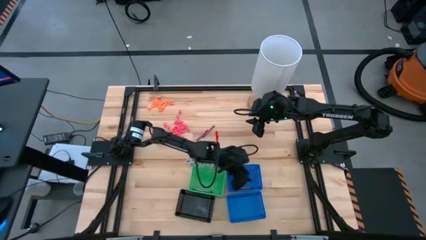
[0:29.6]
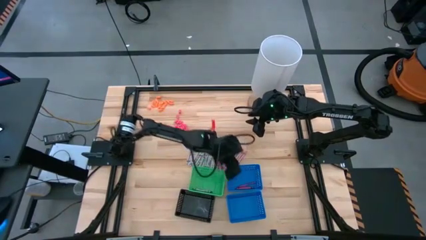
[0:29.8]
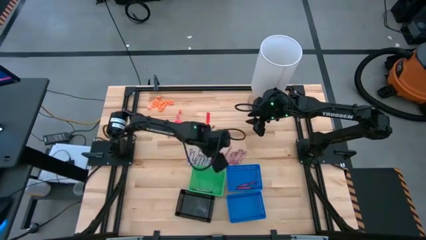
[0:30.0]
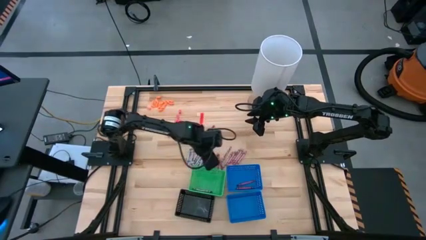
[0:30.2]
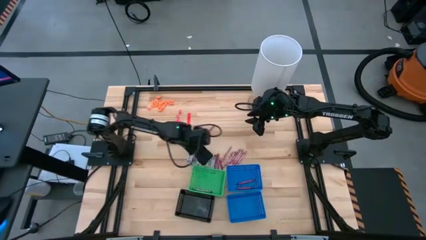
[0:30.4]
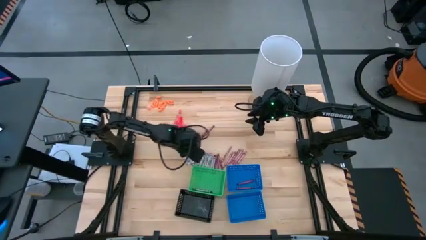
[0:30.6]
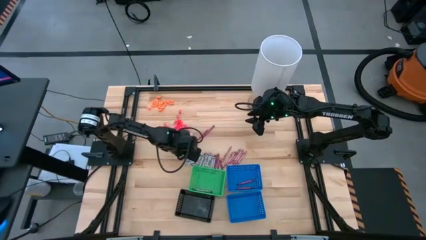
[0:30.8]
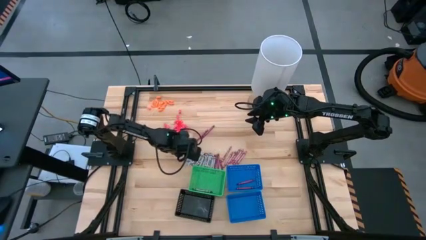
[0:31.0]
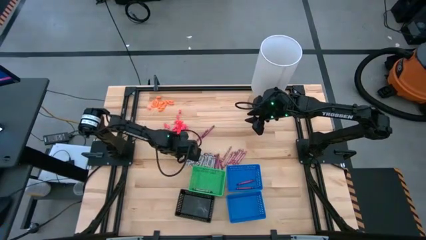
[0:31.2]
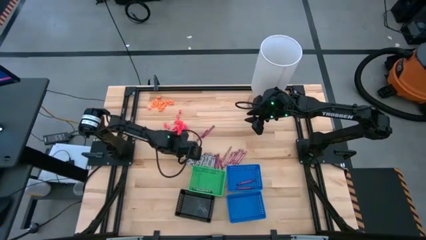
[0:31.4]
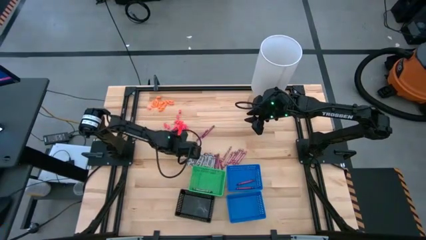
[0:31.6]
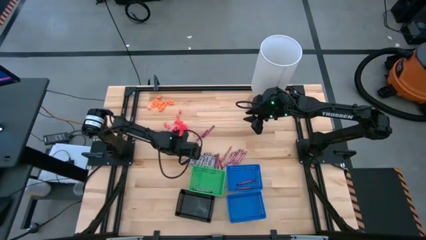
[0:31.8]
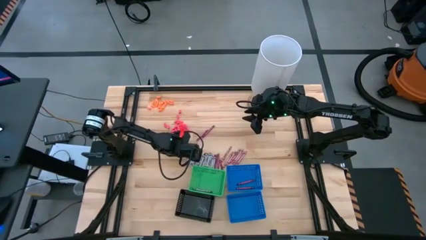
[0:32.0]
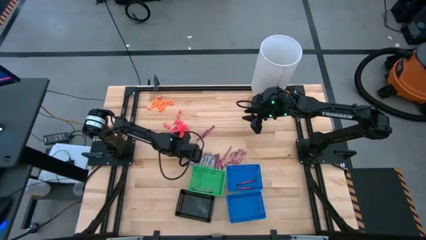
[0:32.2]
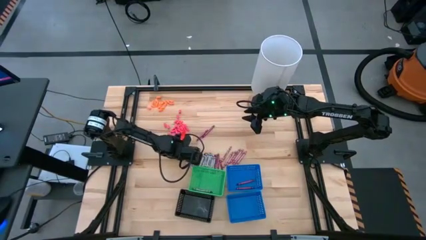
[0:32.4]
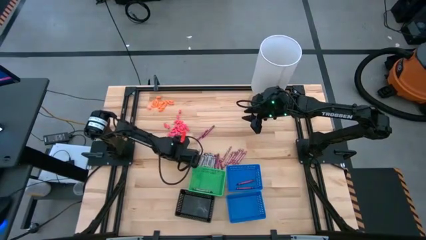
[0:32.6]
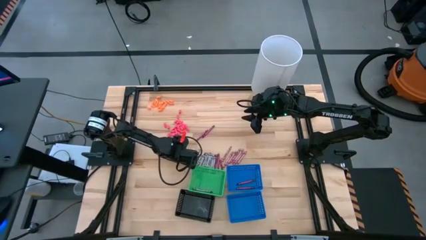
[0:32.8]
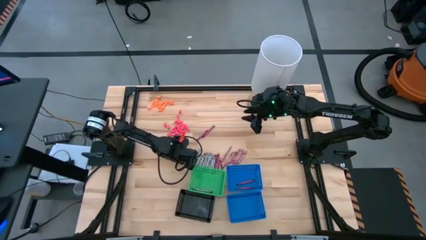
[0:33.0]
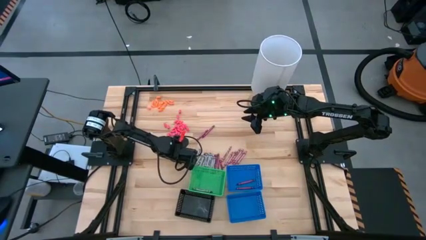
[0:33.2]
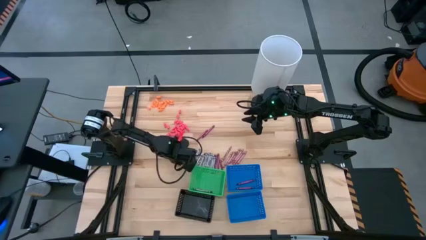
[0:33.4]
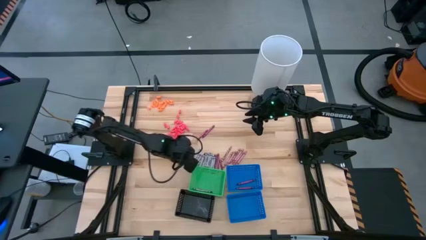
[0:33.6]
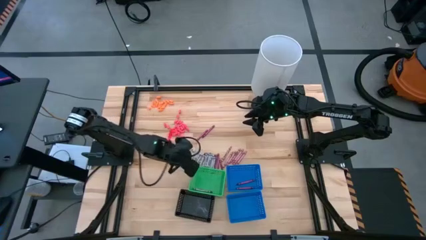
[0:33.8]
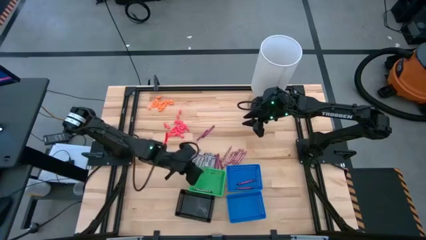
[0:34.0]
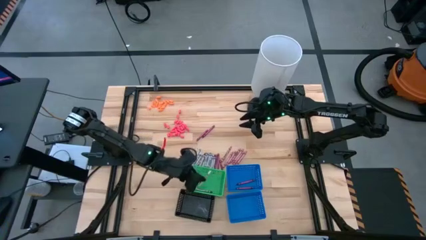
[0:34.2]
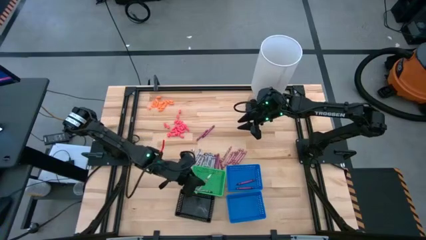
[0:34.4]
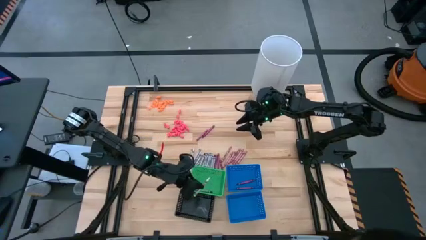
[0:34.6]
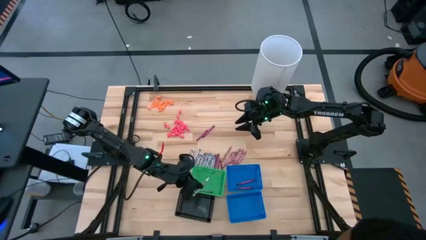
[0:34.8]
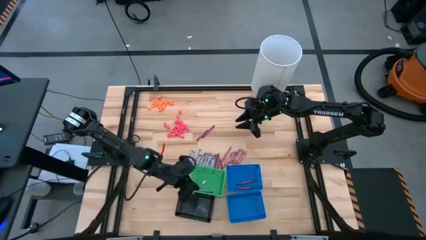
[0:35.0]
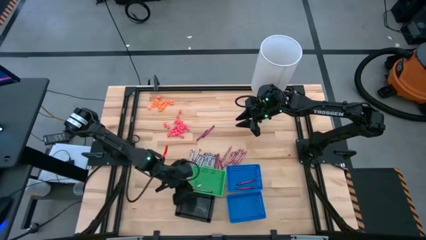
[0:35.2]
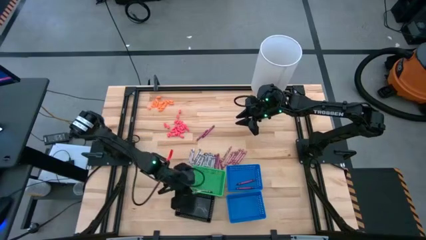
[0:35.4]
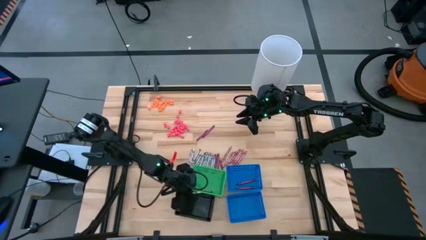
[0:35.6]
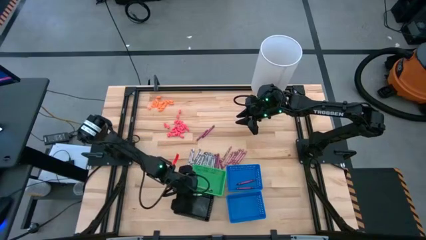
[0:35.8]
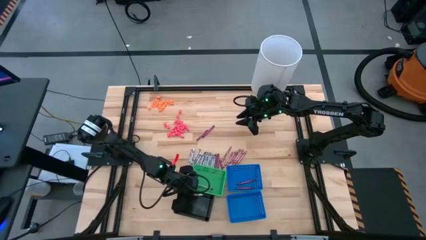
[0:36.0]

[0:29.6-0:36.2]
Task: Sort crayons
Put the white crayon into the black bin

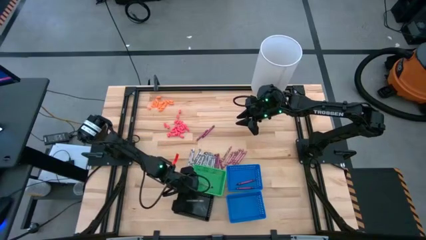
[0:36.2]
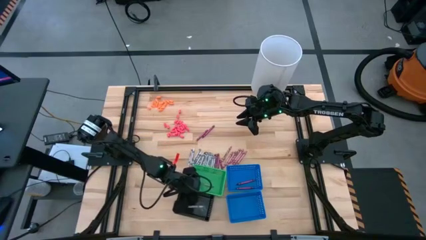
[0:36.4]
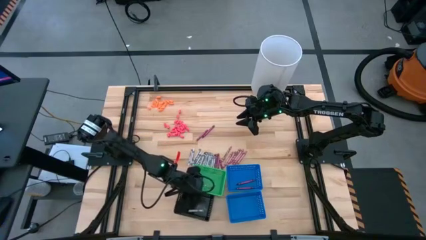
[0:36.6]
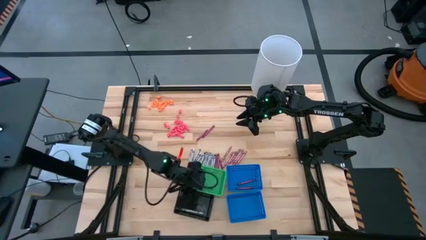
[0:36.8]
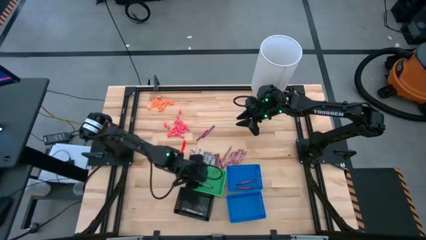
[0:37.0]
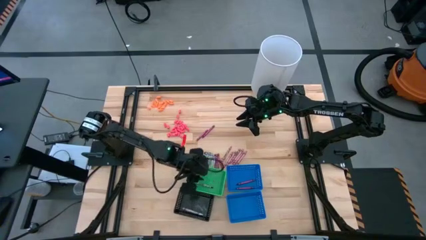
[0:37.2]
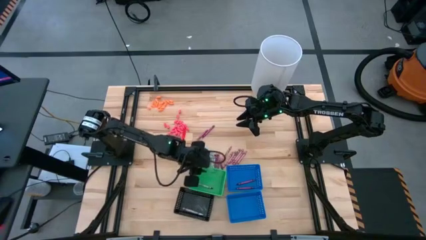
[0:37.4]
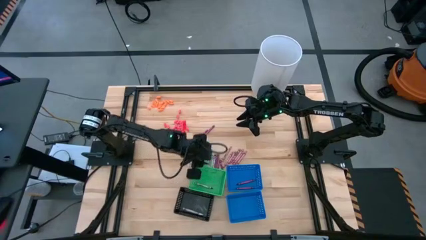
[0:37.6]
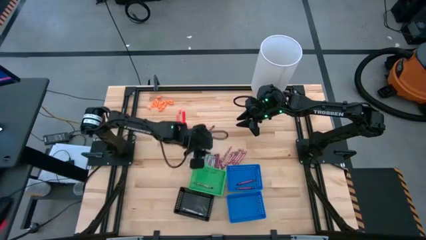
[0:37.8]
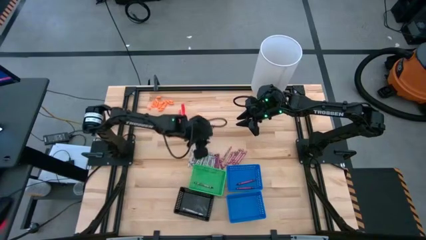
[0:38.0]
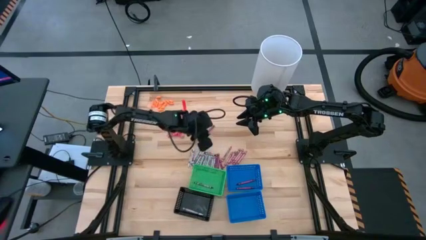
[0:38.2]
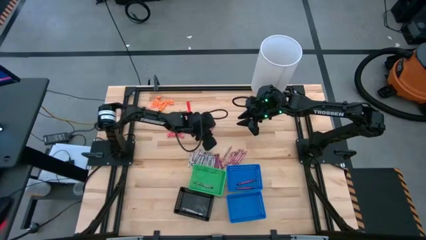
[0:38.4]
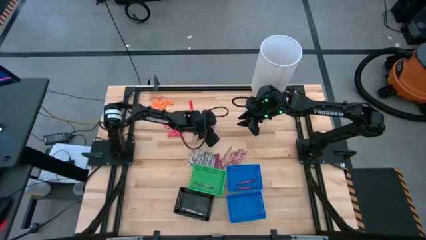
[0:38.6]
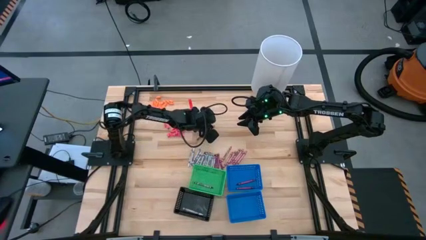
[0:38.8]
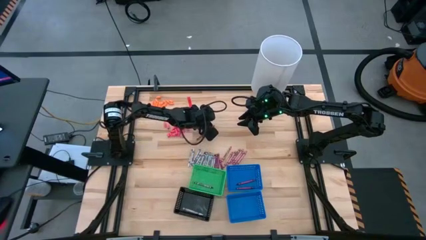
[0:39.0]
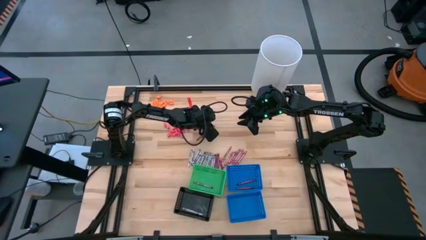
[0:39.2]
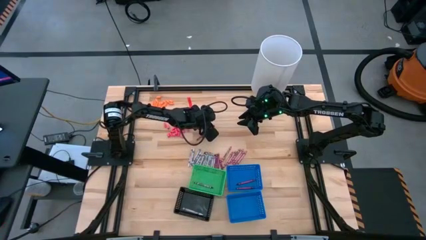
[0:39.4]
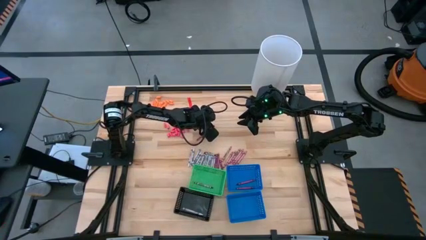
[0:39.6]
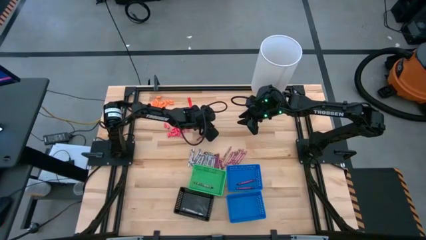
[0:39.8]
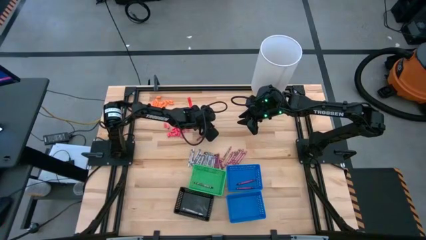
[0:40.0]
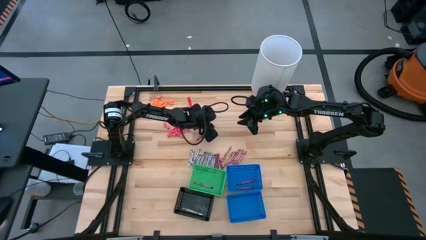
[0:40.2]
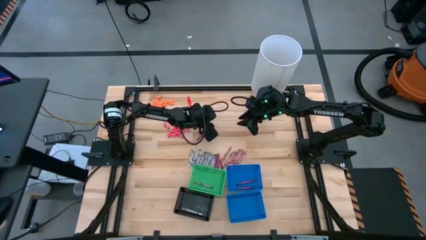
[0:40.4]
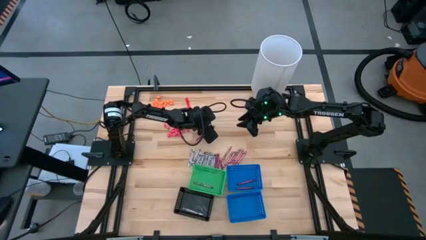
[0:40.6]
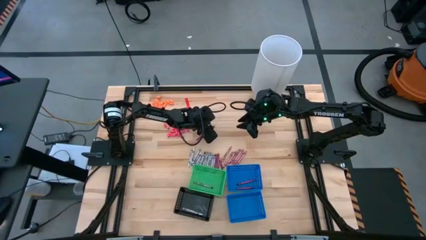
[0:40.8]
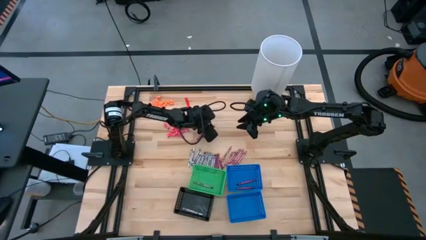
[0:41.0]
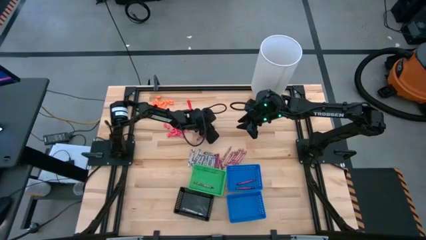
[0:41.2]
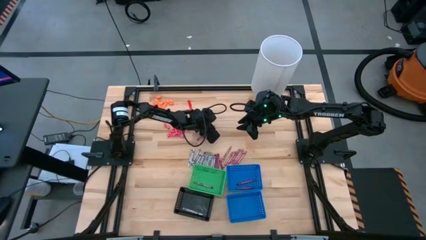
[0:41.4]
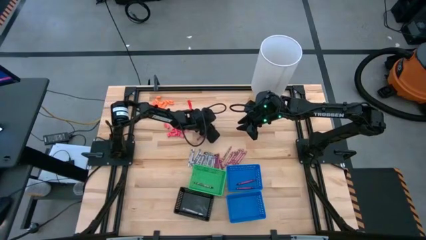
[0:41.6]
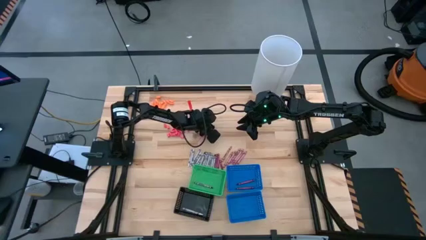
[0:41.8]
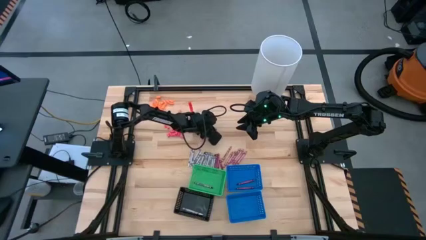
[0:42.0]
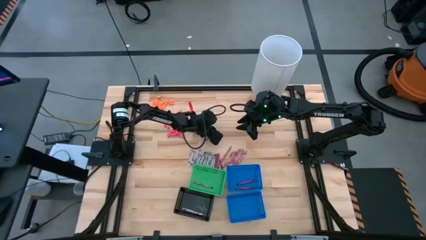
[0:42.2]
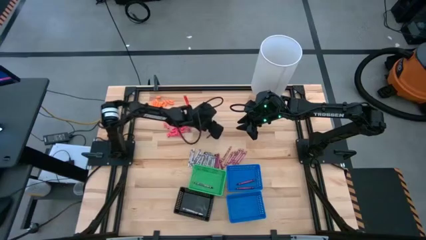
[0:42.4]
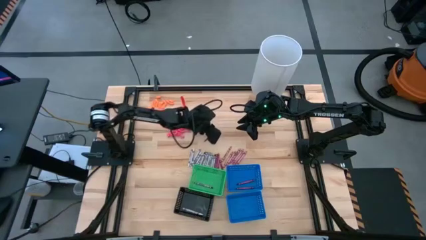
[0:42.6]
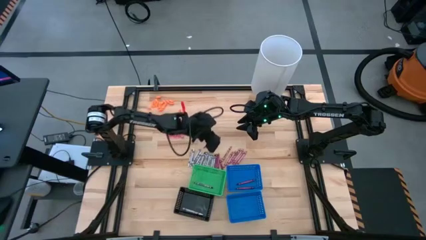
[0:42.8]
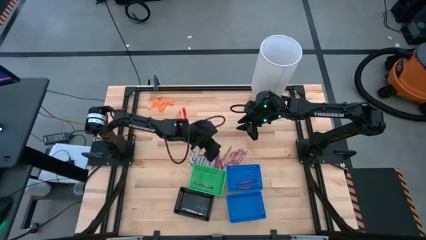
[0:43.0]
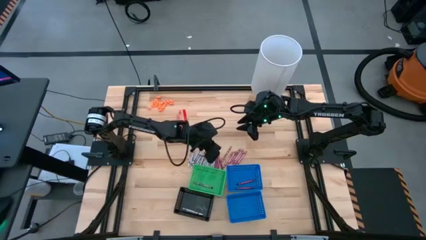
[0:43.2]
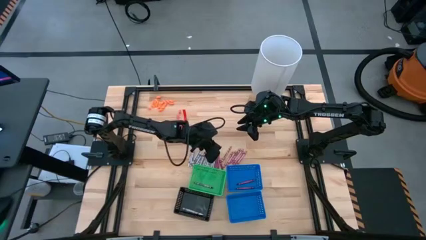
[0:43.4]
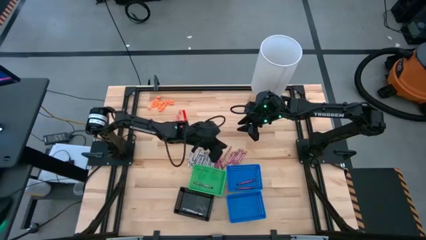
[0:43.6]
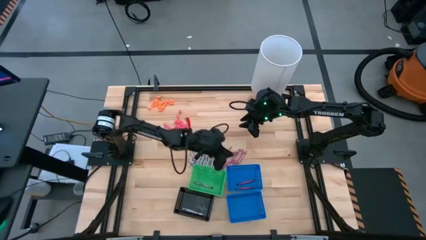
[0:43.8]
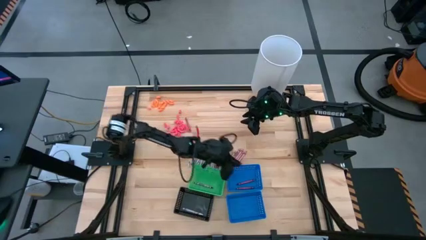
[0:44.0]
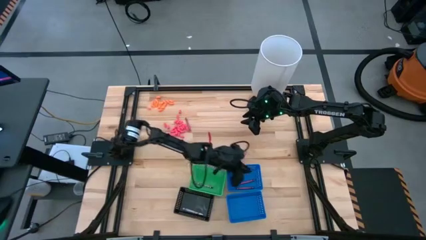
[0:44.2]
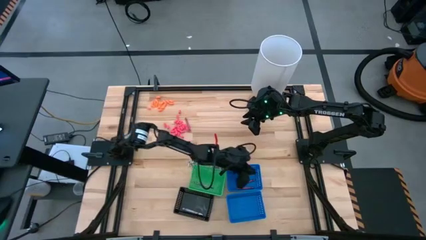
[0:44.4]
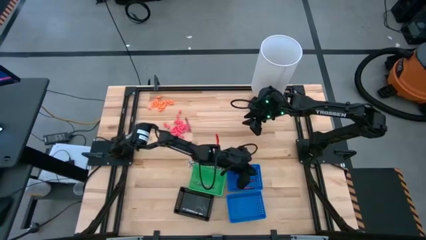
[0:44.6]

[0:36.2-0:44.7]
Put the violet crayon into the top blue bin

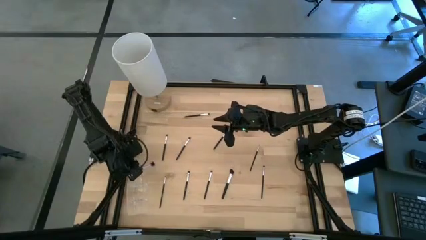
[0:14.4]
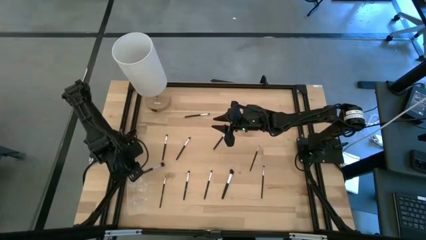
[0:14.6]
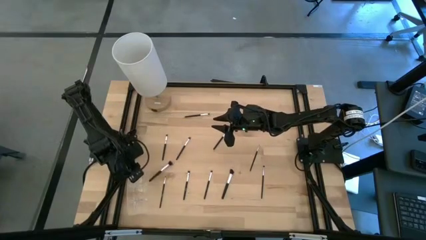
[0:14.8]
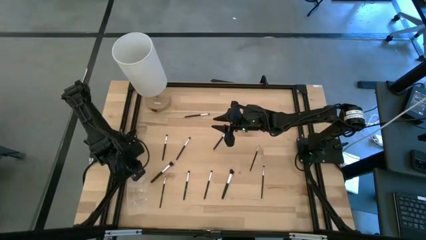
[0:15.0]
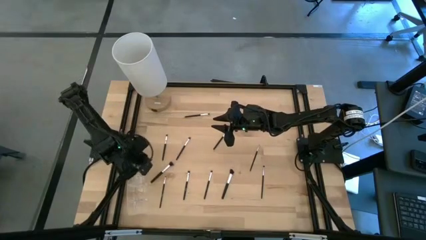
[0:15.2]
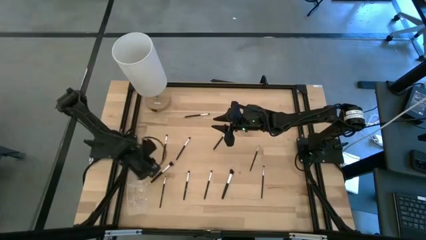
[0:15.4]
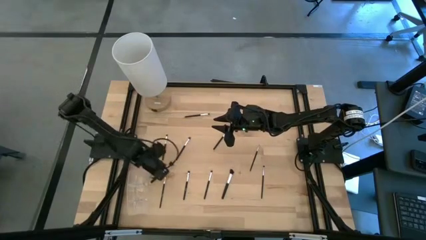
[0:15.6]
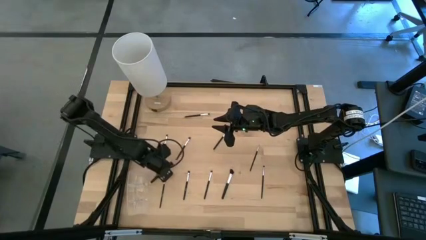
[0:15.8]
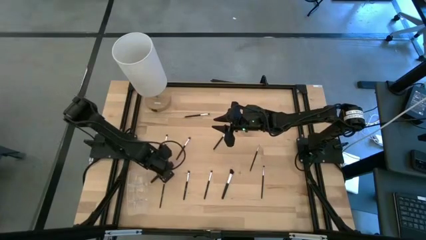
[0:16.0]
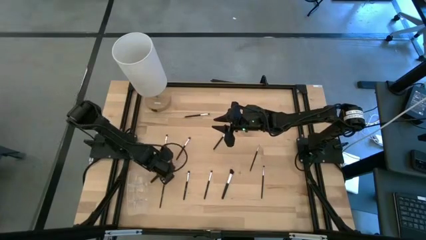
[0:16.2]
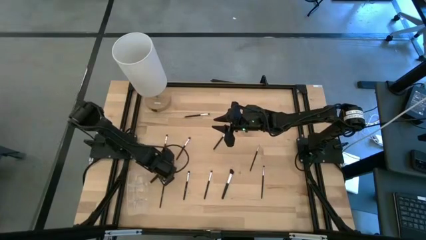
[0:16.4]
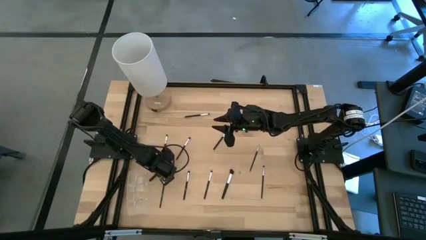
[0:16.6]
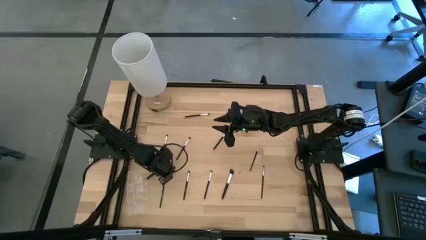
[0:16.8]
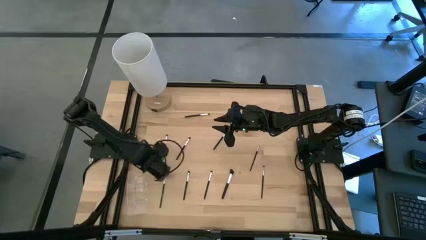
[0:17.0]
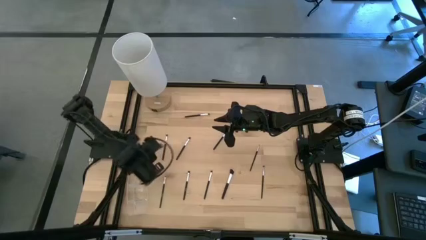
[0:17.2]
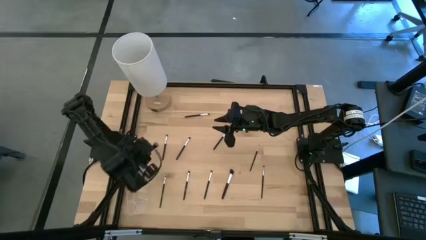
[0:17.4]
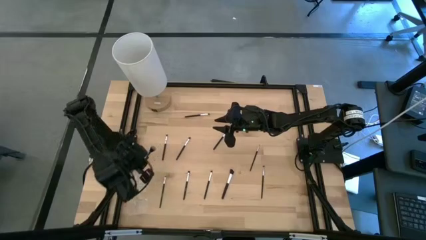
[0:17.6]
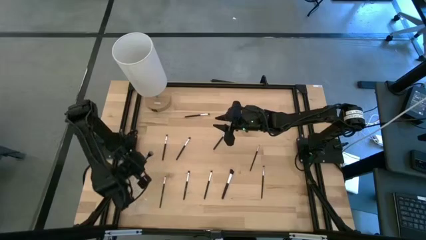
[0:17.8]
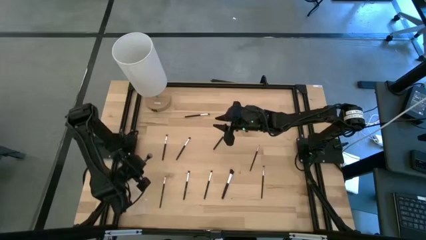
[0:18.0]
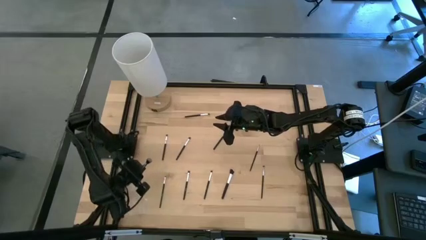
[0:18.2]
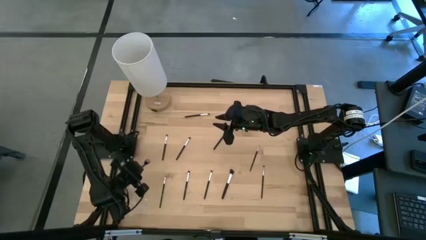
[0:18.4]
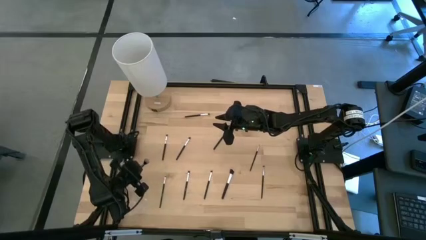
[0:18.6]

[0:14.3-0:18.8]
Task: Pick & Place Makeup Supplies
Put the makeup brush into the transparent organizer
